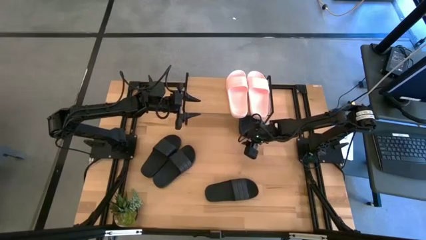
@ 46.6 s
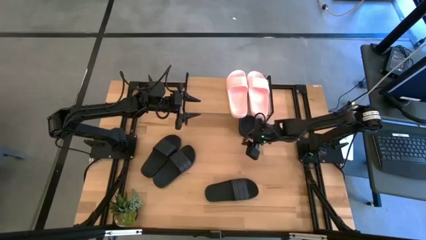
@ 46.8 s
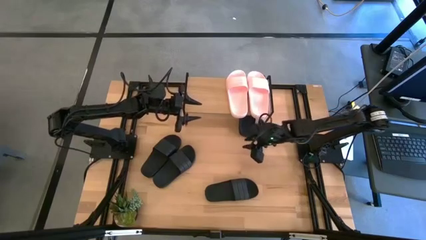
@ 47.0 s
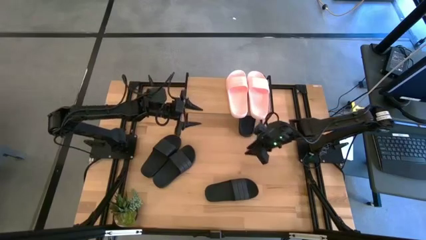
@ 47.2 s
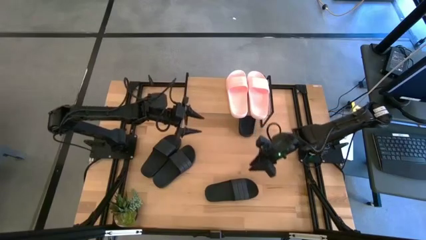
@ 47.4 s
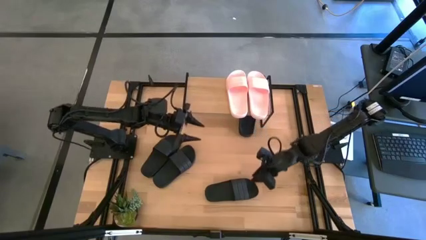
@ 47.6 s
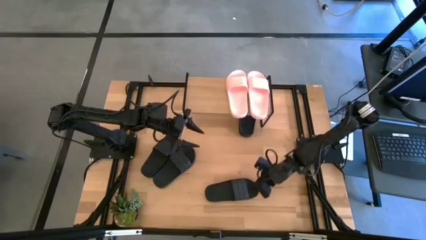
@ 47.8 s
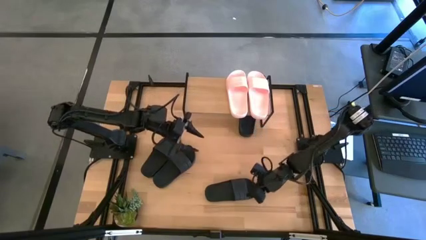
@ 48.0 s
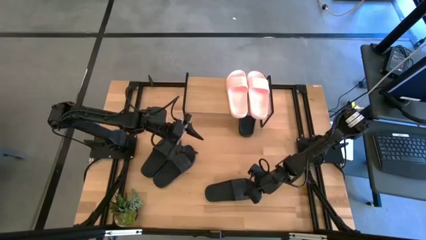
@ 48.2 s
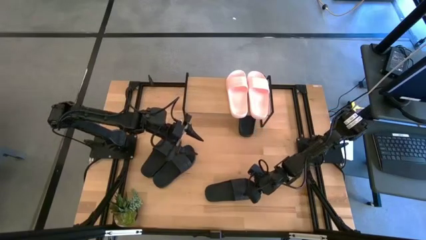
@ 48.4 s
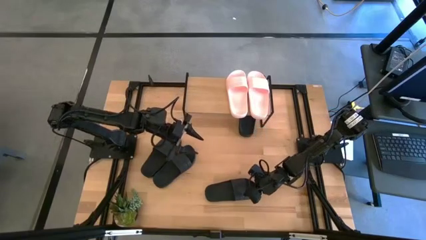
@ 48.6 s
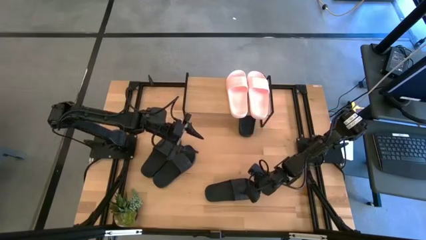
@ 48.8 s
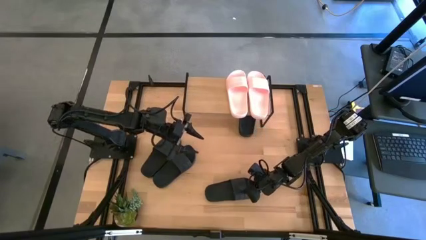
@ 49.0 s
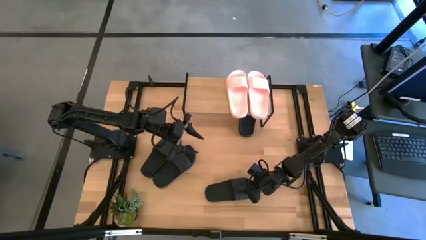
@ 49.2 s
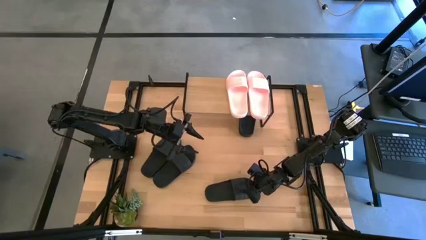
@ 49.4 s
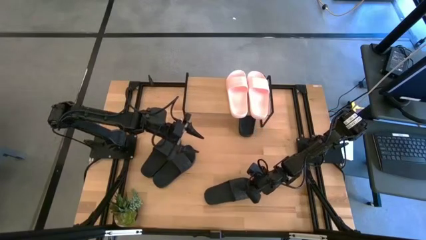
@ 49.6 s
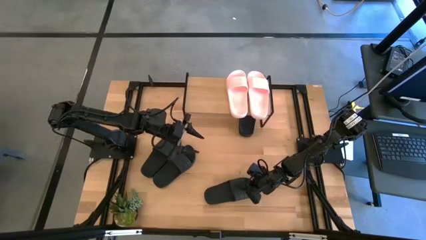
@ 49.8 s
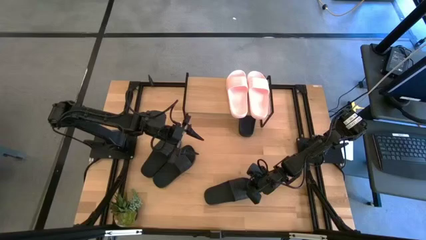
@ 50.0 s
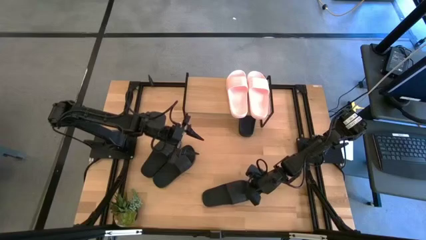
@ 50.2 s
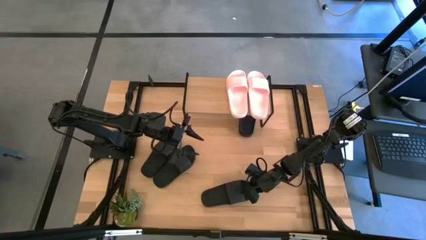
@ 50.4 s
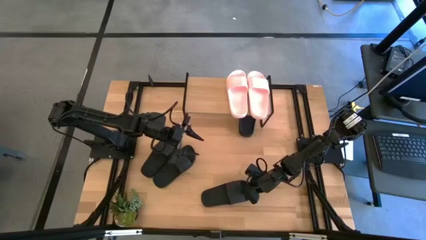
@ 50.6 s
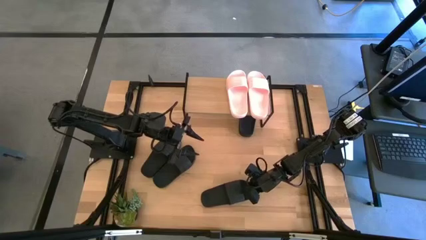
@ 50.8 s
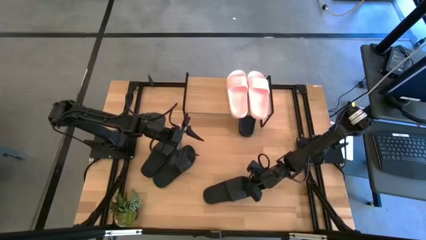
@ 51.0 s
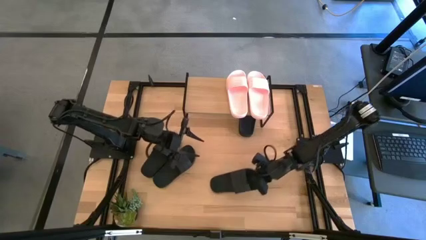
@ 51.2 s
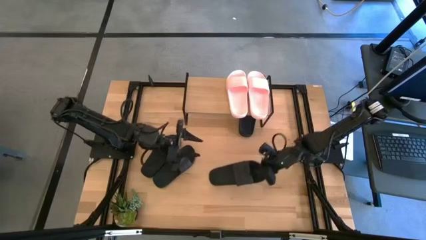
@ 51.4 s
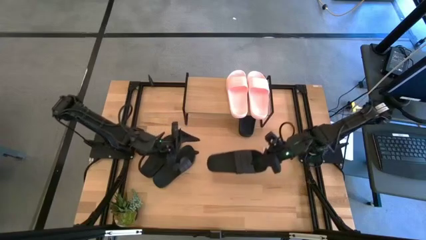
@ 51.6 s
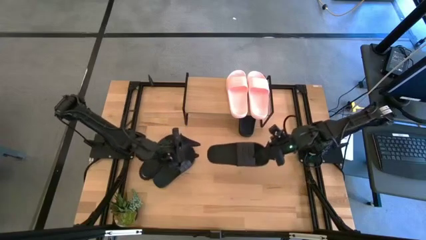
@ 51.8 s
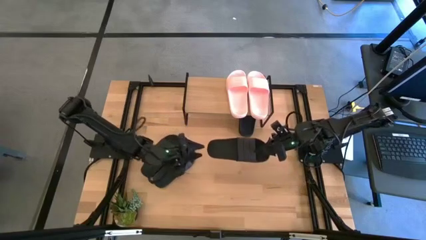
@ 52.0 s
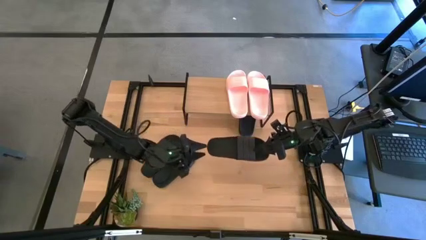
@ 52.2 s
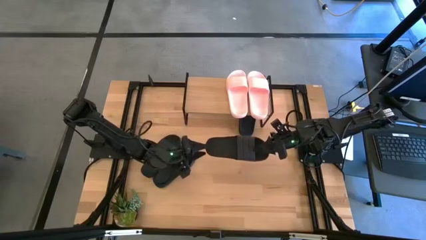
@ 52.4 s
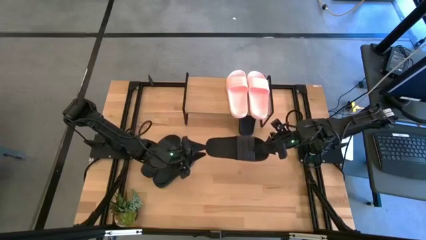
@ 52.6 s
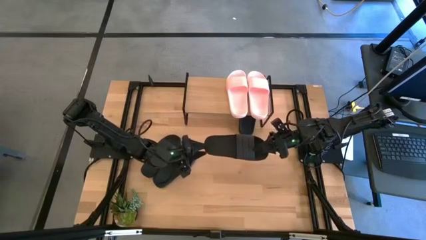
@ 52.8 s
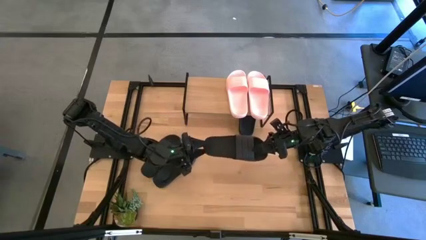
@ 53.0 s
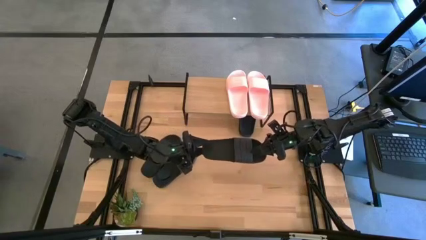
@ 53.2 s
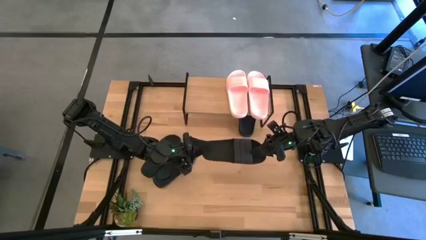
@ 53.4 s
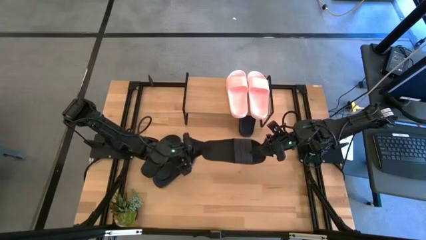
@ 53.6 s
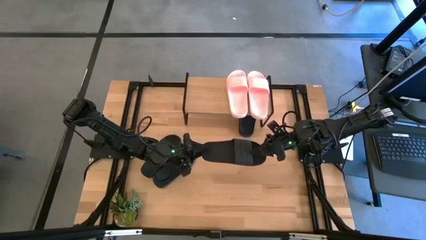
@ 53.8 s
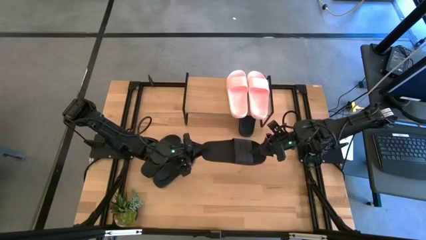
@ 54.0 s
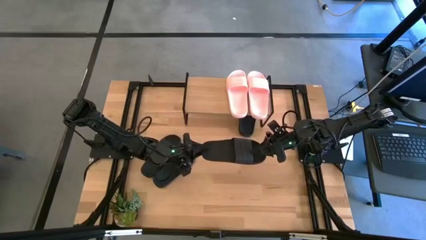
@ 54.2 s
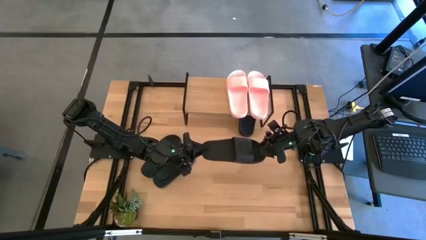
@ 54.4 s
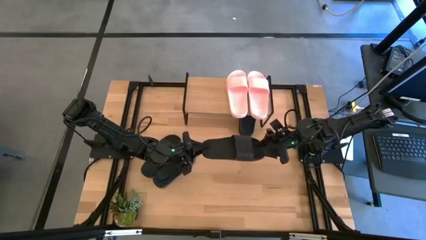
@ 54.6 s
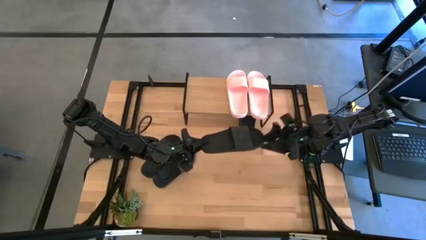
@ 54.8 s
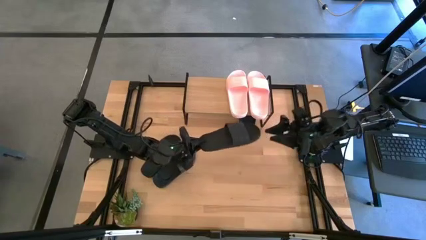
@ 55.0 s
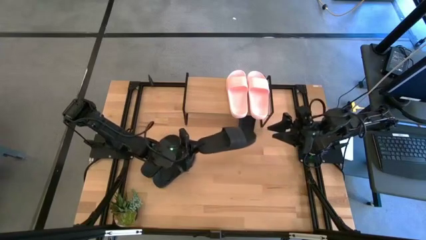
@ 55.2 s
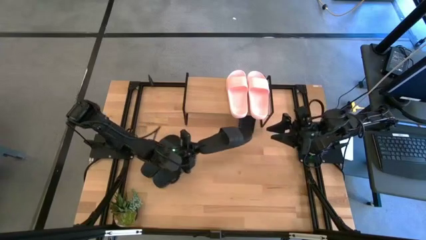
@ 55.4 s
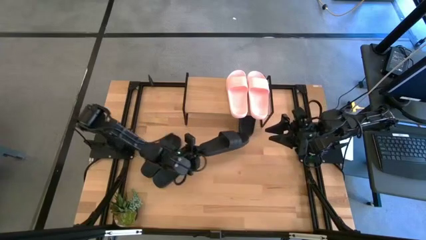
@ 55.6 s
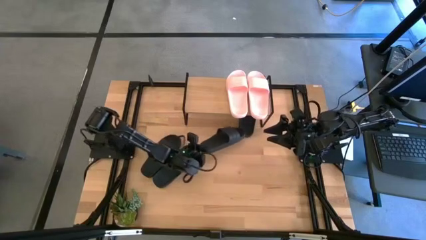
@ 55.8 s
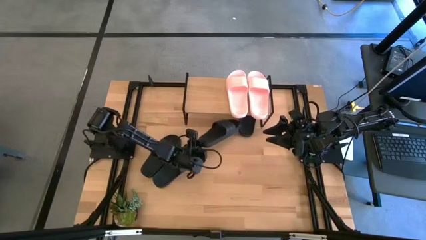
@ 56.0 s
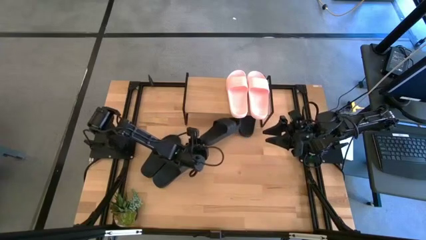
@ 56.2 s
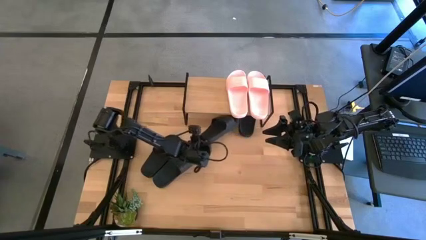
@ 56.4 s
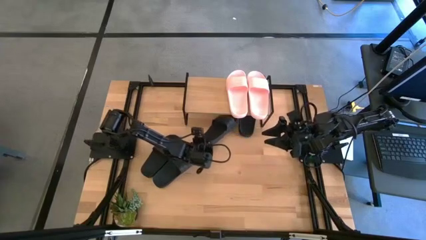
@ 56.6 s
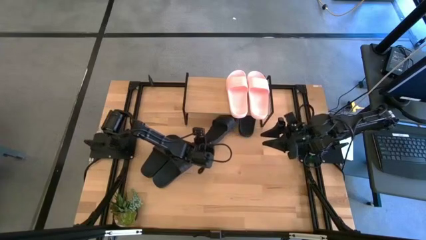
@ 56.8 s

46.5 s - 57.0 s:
Task: Pick and place slides into the shelf
Put the right black slide under the shelf

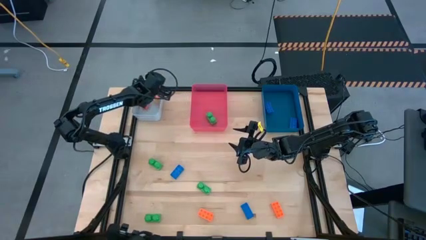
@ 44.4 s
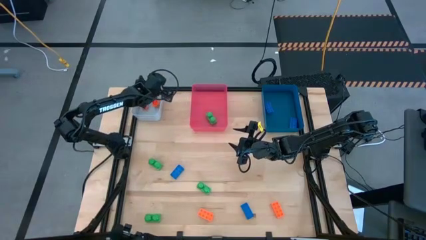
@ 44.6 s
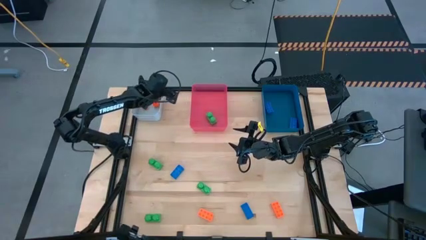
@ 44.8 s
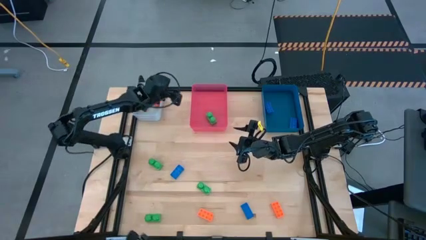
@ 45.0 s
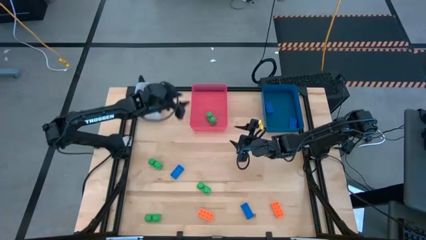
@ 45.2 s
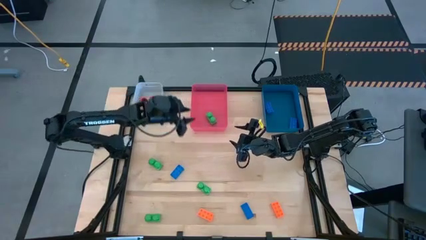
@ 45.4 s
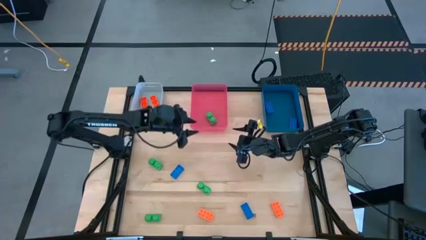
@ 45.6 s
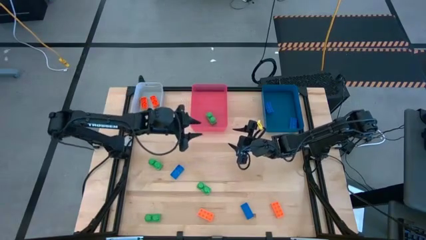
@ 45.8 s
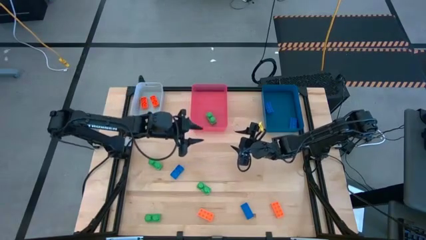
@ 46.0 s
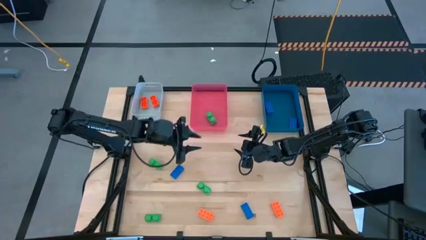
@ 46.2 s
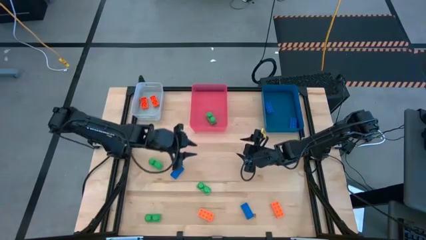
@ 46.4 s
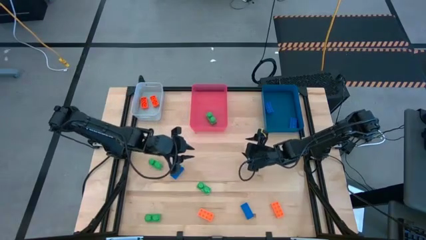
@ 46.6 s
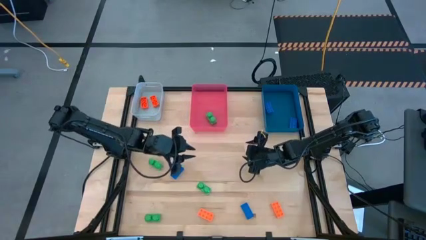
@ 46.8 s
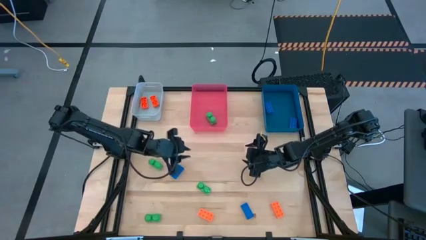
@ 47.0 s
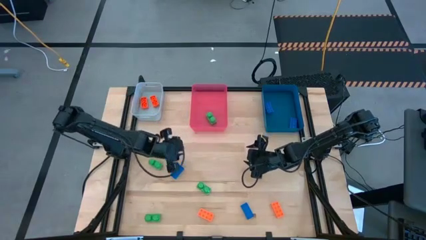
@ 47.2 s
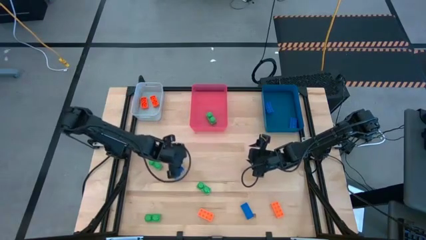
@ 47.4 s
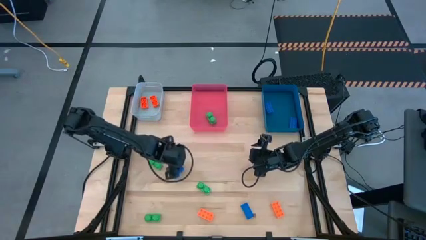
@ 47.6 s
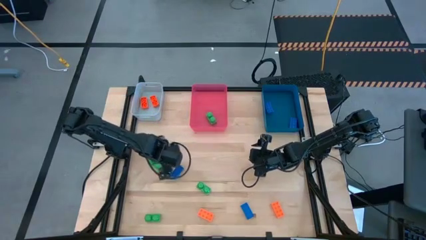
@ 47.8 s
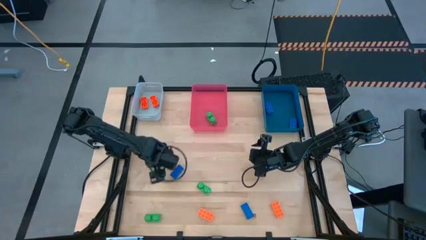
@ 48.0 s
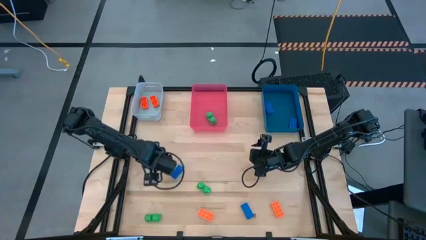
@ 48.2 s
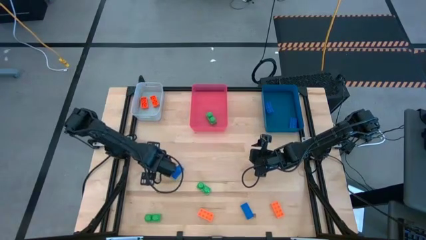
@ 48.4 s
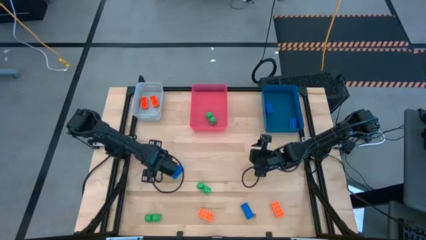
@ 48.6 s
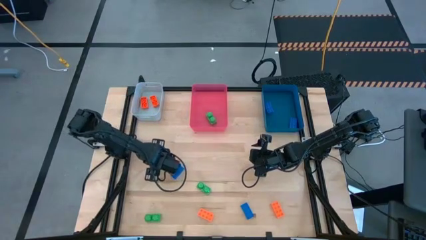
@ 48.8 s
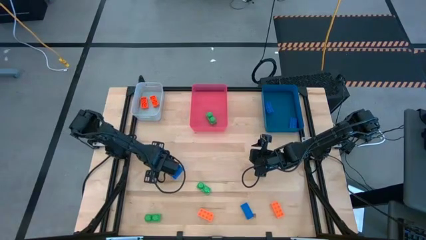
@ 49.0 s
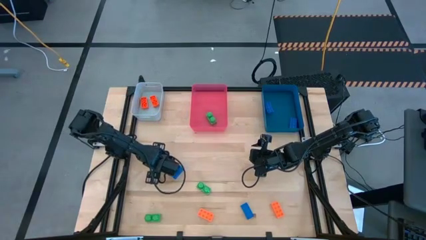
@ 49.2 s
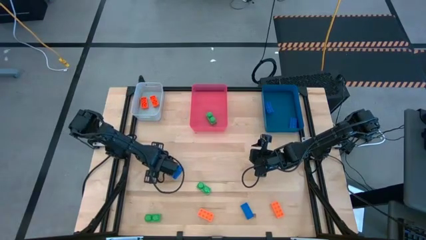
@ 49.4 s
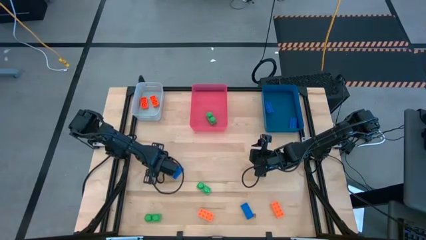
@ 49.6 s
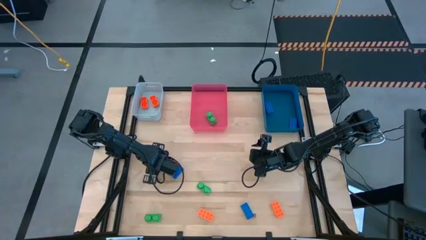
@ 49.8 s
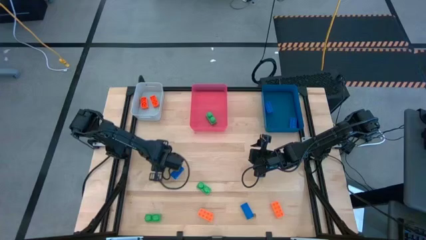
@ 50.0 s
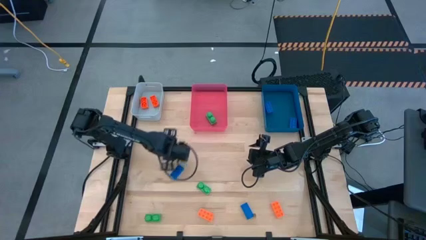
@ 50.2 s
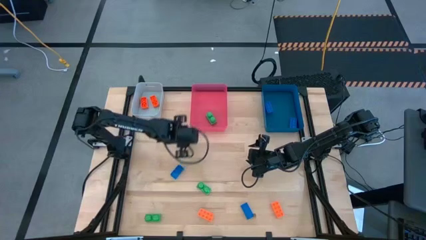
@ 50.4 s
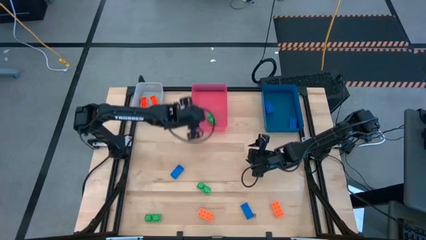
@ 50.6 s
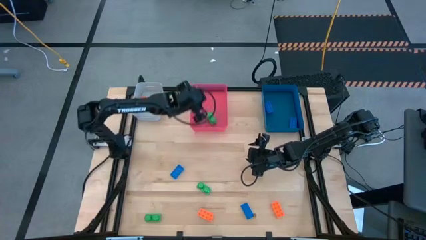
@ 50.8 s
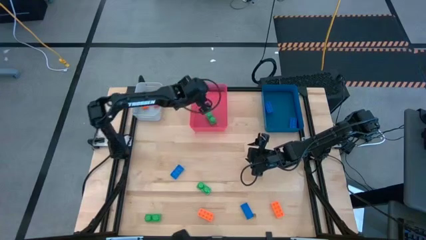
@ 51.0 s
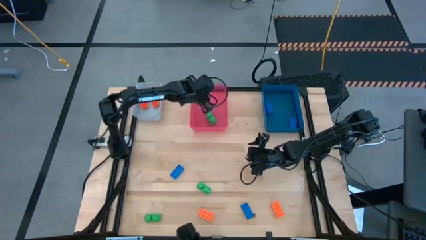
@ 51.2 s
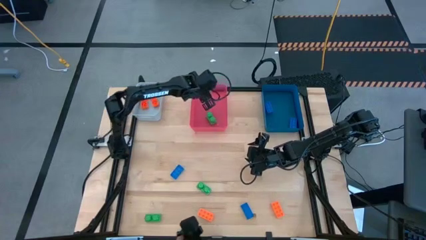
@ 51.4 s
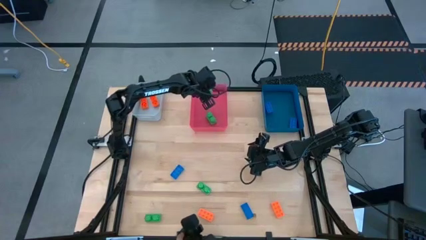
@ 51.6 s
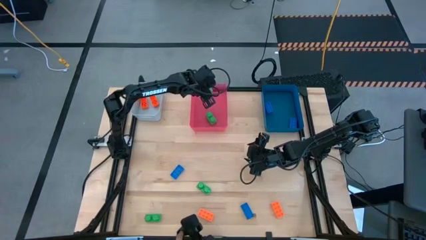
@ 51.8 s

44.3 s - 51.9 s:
Task: Sort & place blocks by color
Put the green game piece into the pink bin
